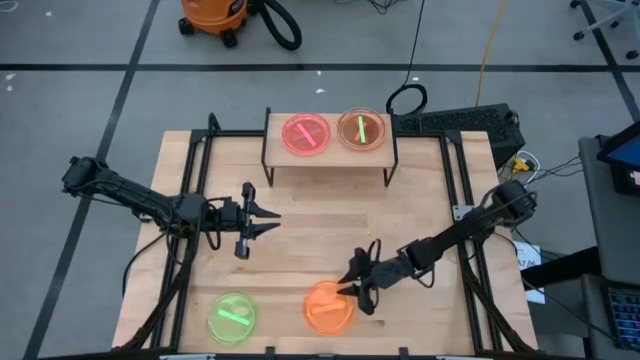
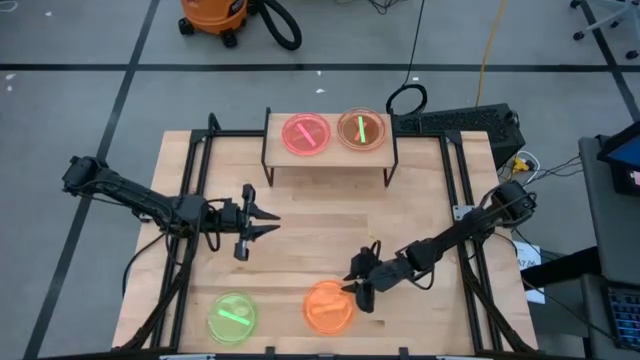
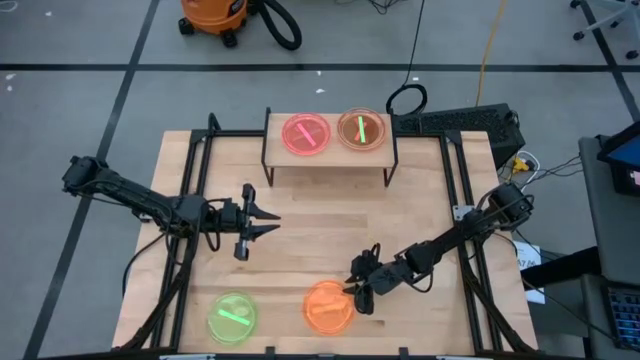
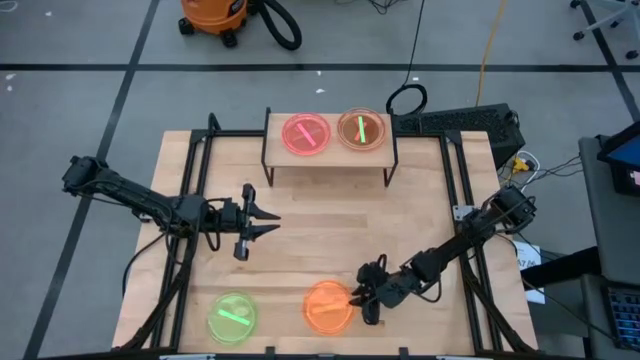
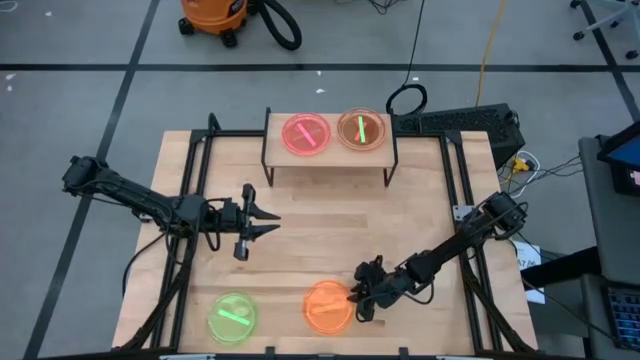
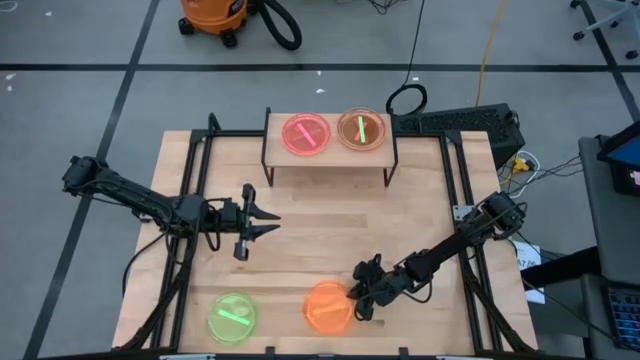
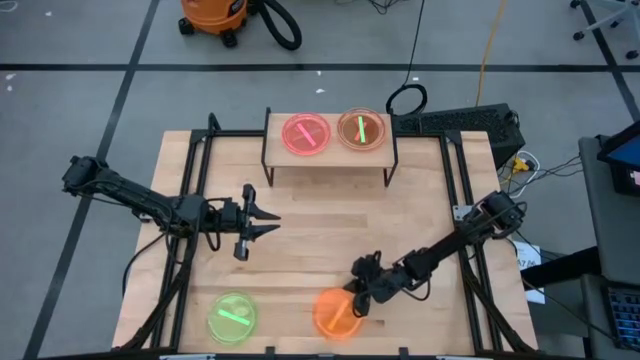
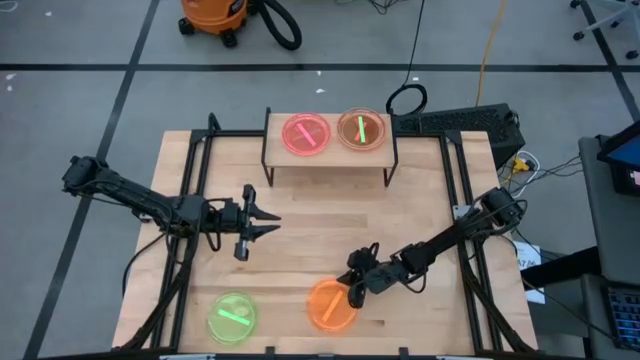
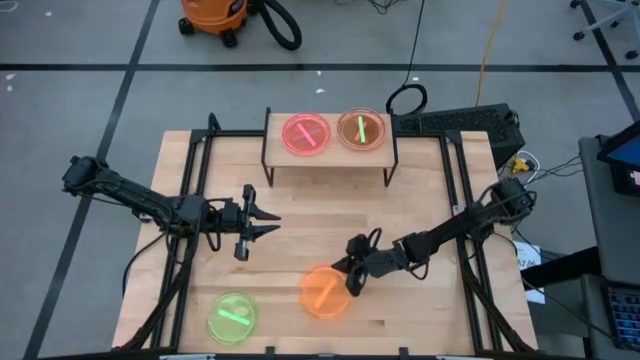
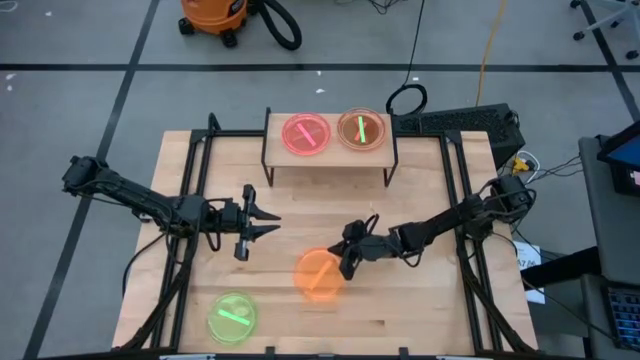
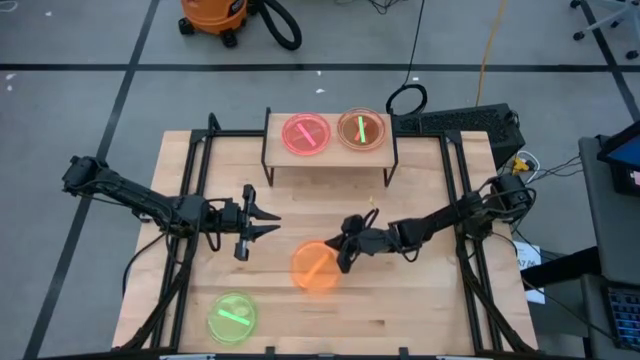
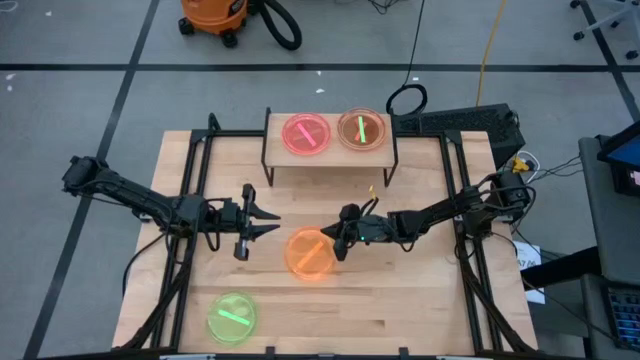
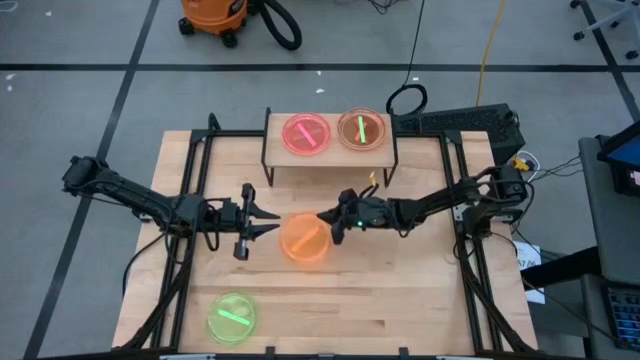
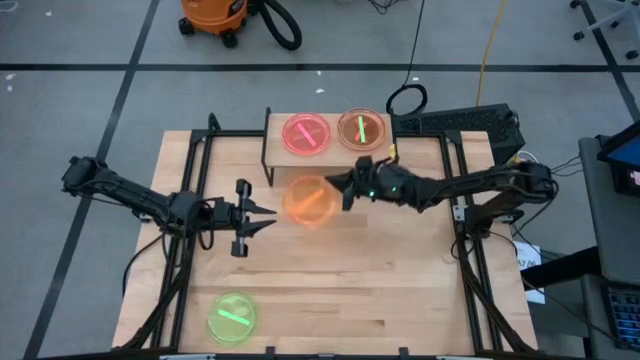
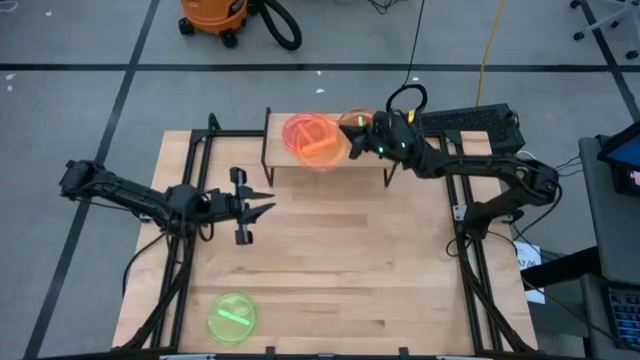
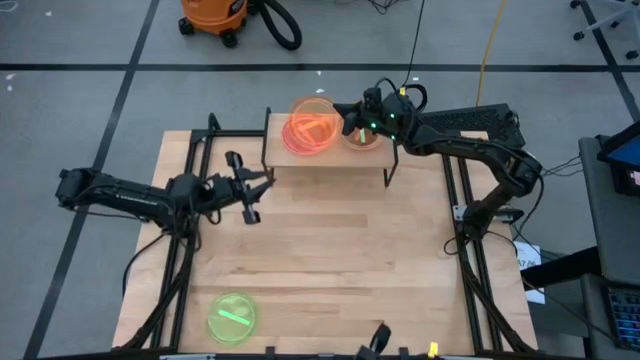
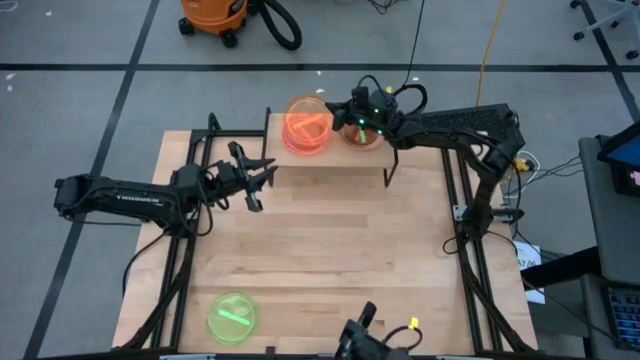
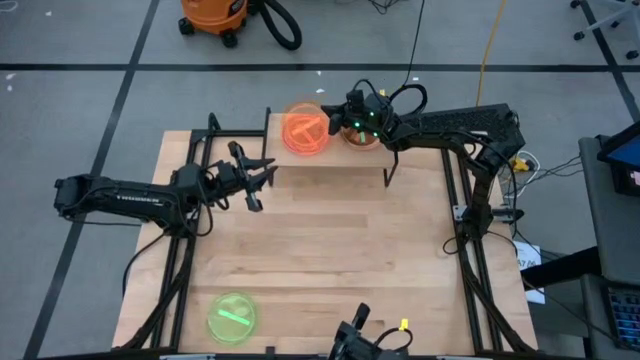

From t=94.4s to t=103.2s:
Task: Place and stack plates onto a shelf
Stack the orange plate on top of the pink plate on the shelf

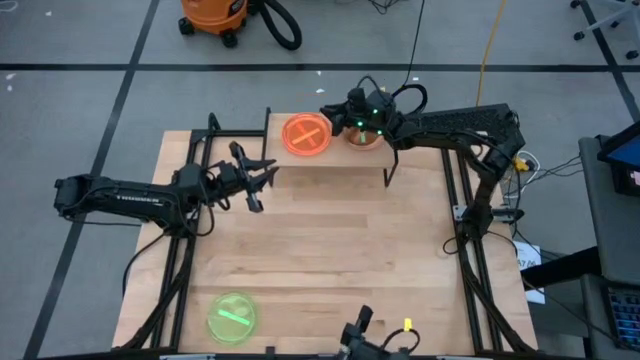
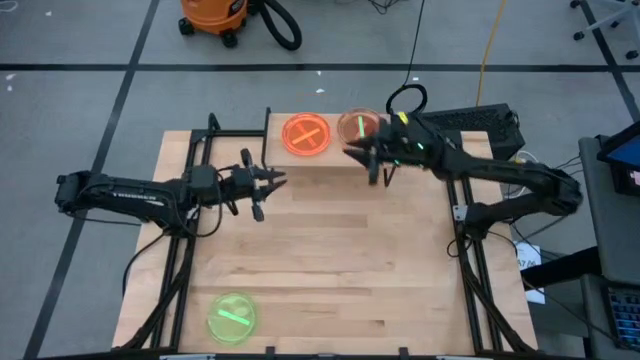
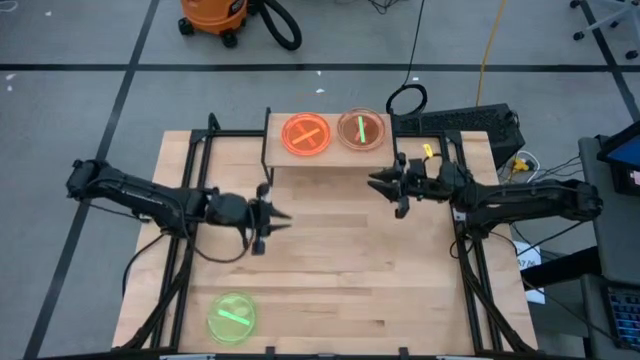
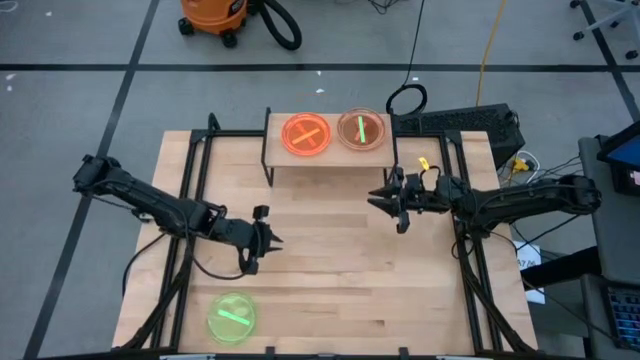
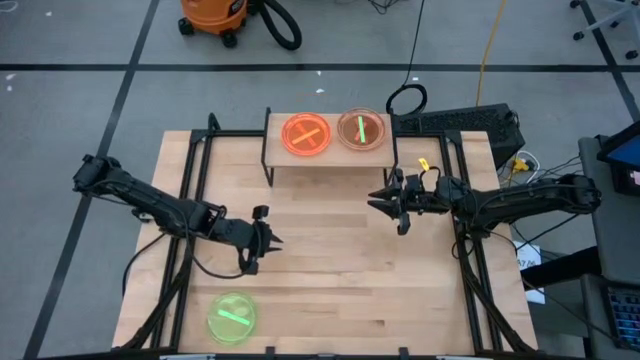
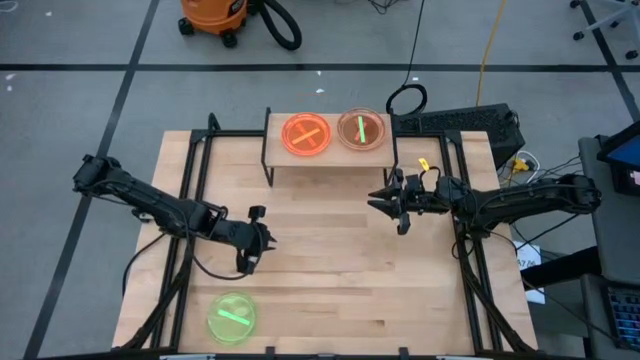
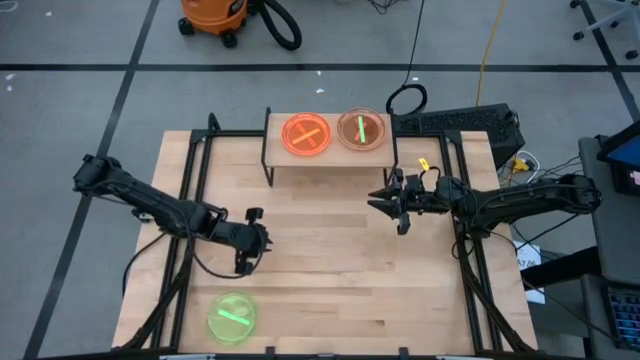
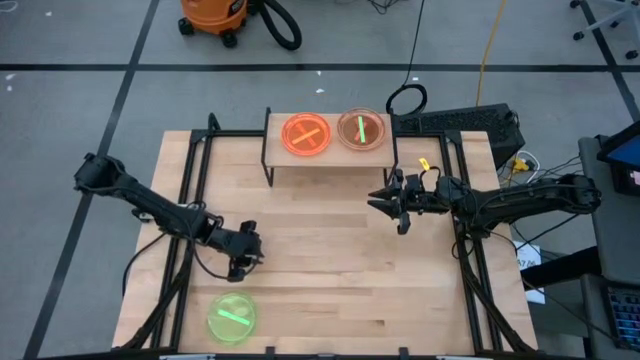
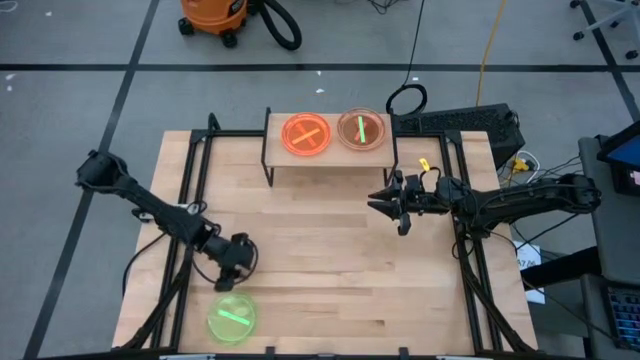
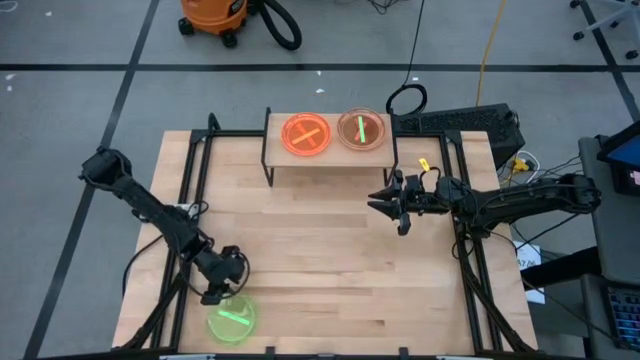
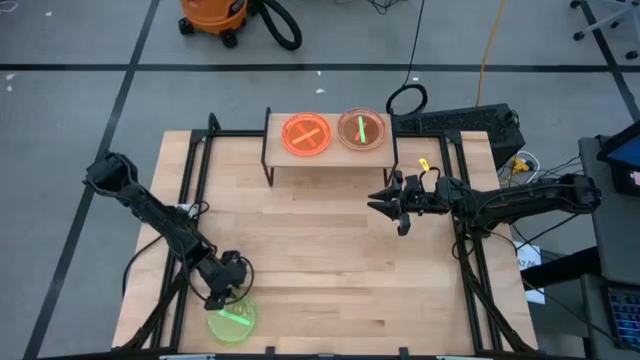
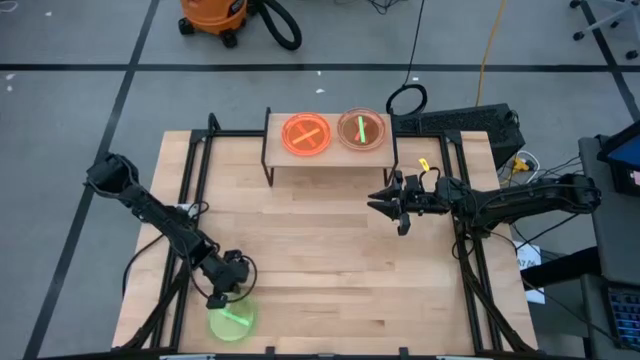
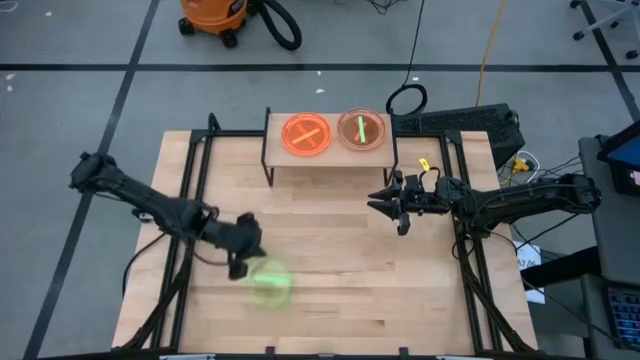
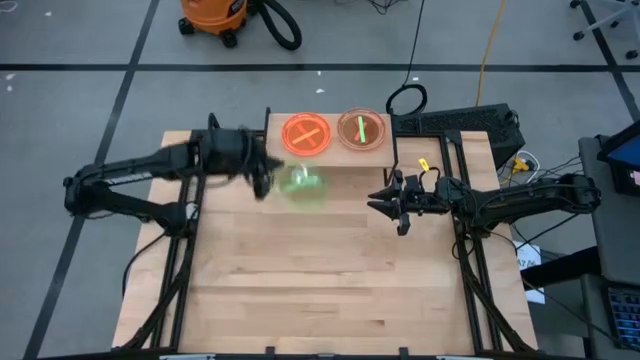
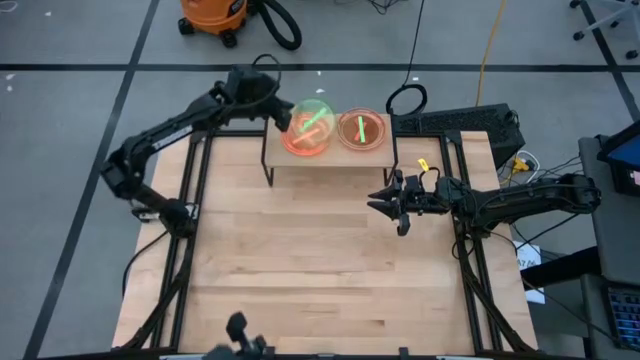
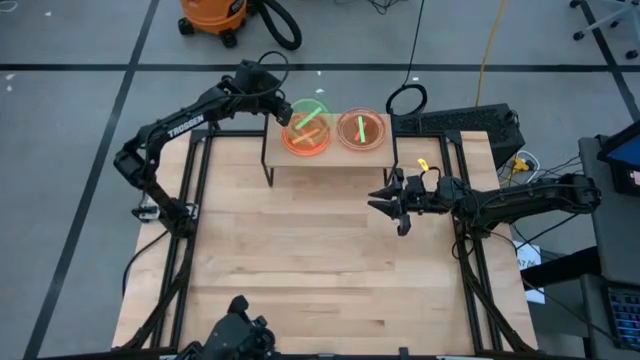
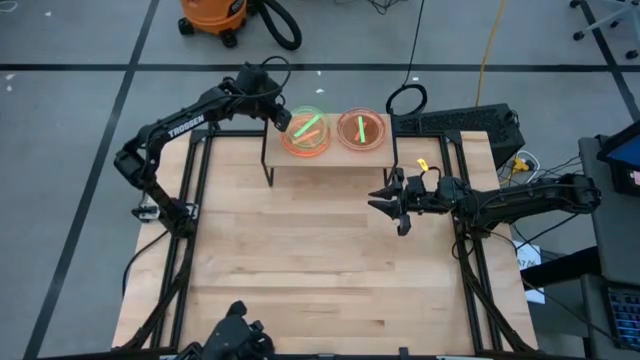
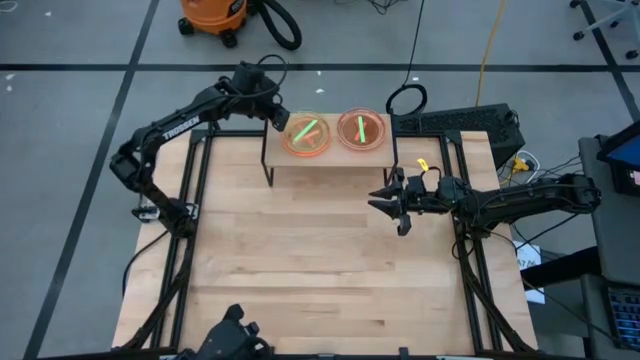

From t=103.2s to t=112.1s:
Stack the green plate on top of the orange plate on the shelf
